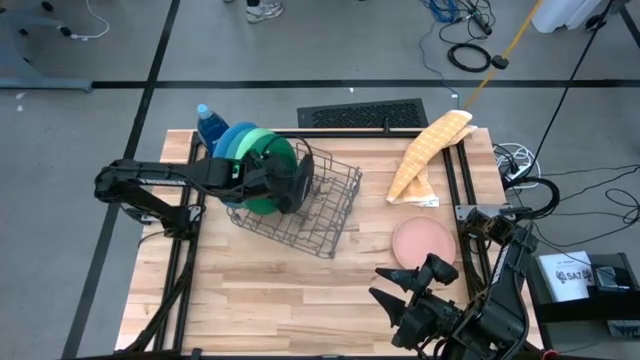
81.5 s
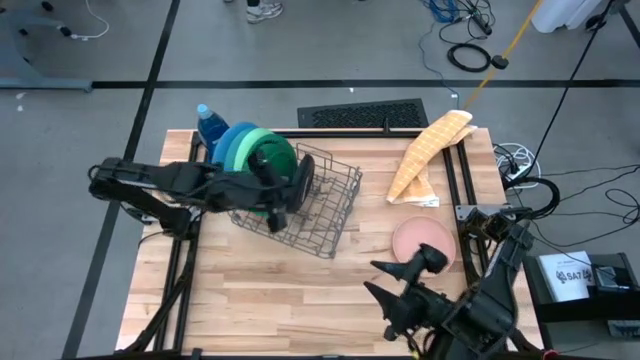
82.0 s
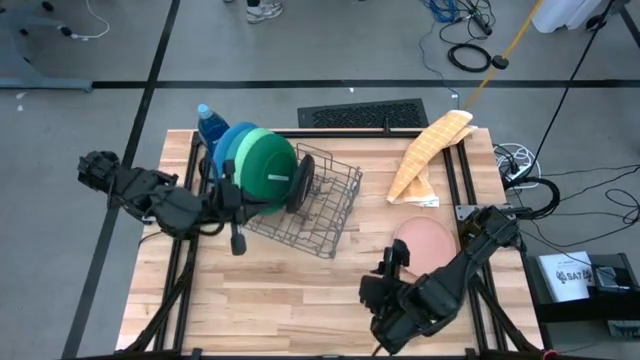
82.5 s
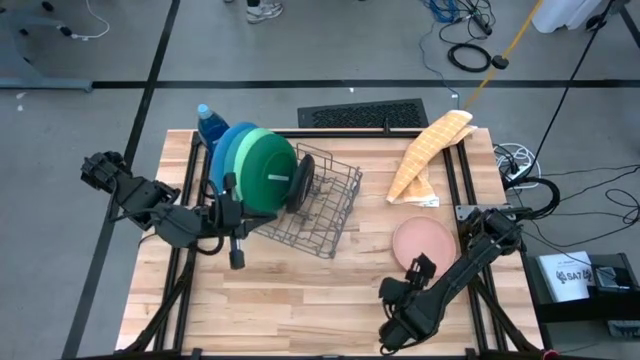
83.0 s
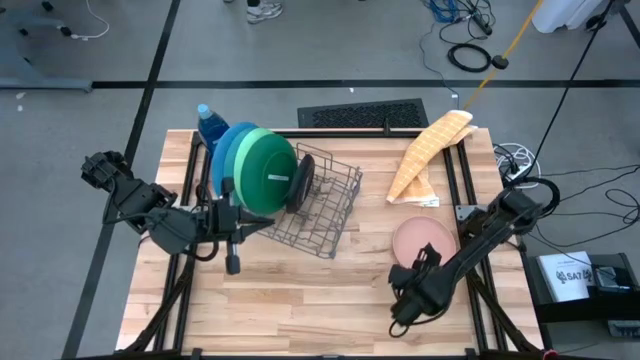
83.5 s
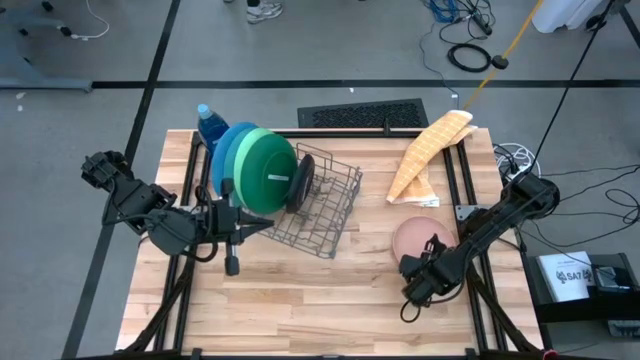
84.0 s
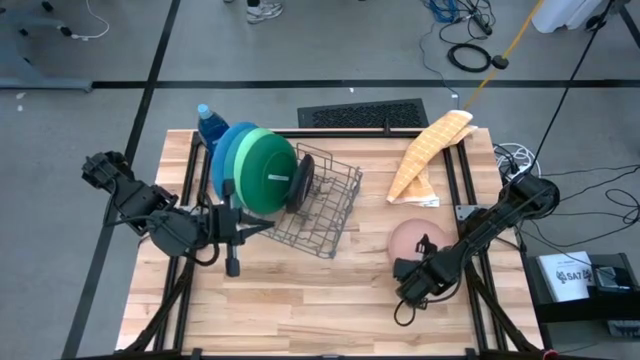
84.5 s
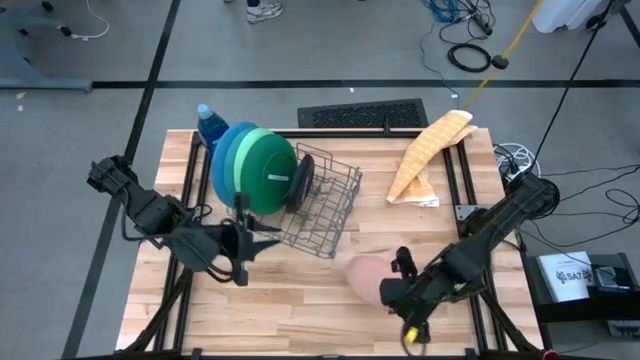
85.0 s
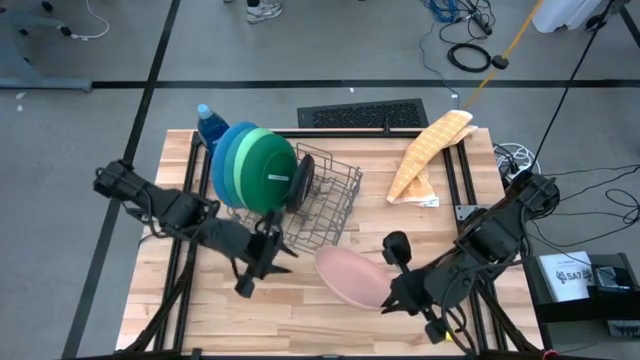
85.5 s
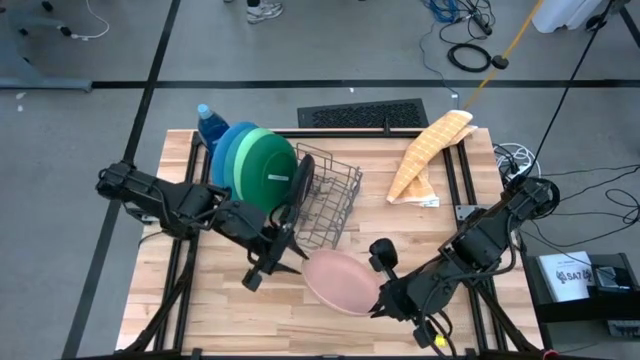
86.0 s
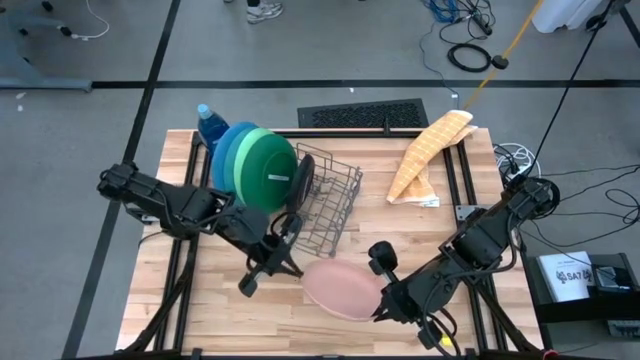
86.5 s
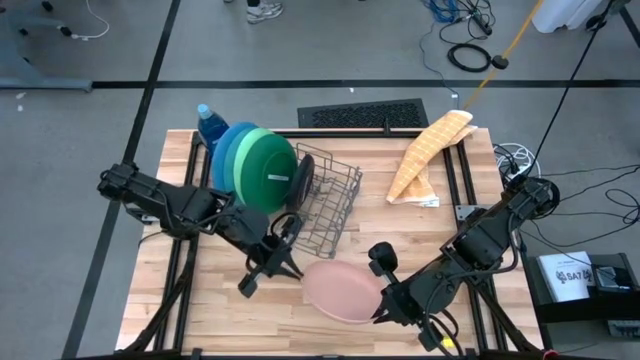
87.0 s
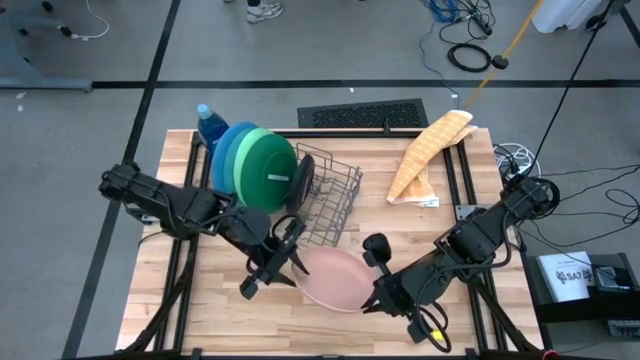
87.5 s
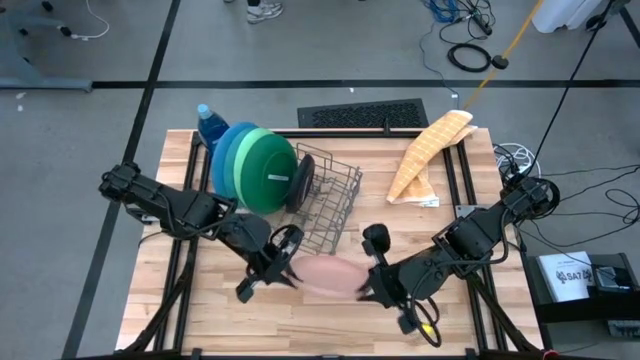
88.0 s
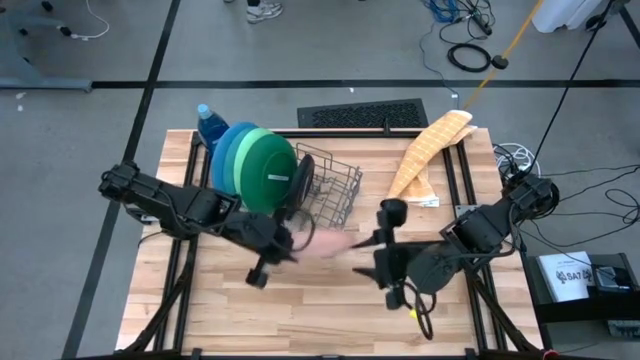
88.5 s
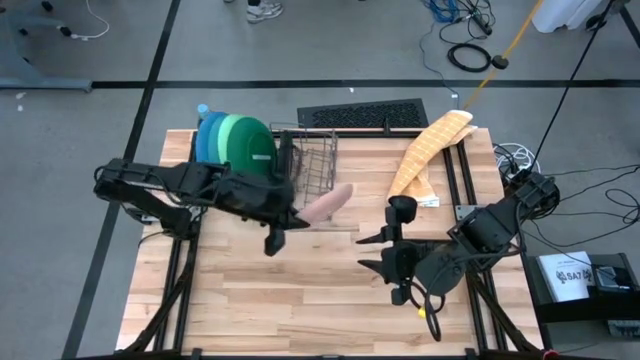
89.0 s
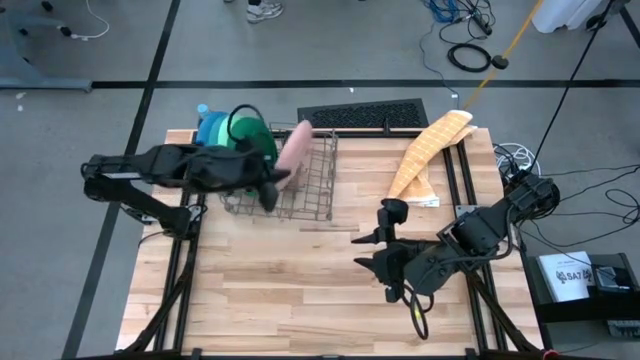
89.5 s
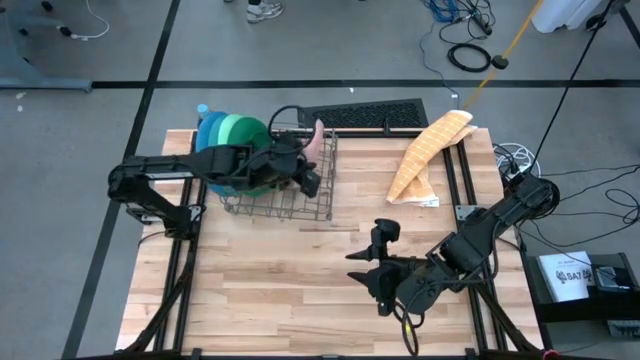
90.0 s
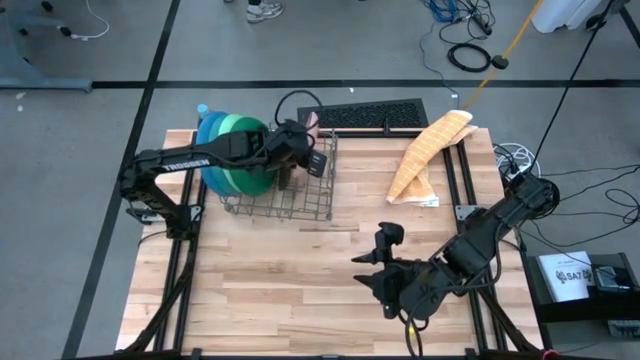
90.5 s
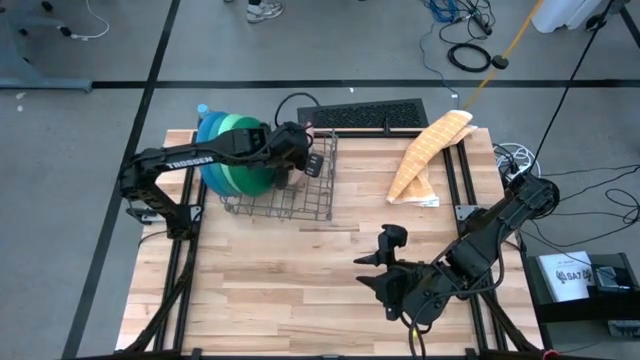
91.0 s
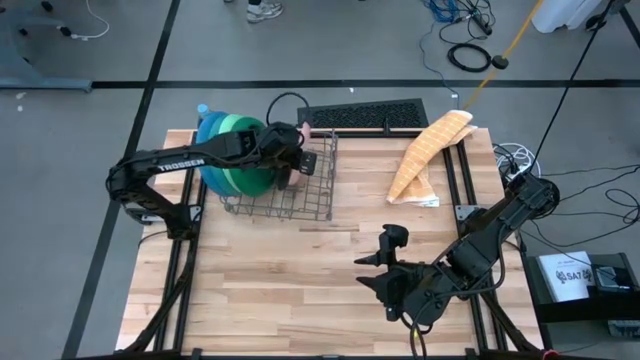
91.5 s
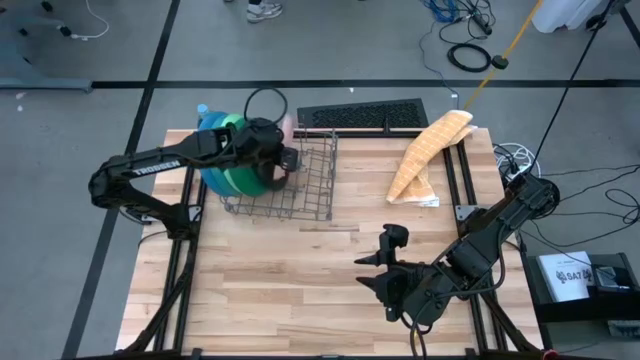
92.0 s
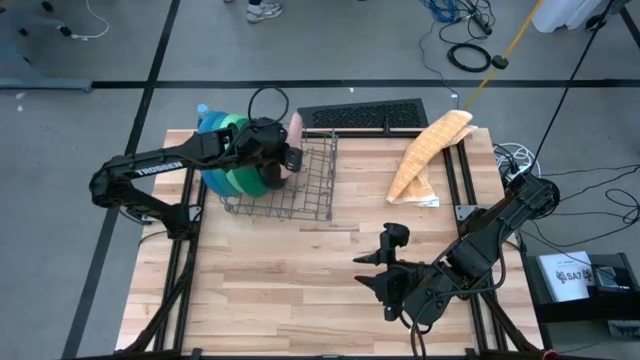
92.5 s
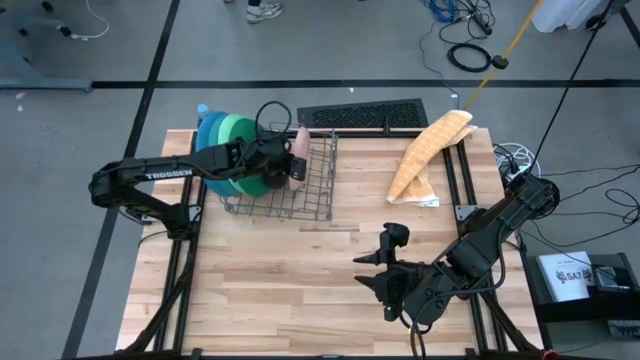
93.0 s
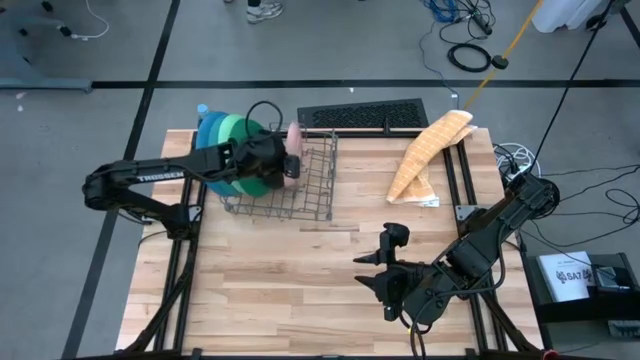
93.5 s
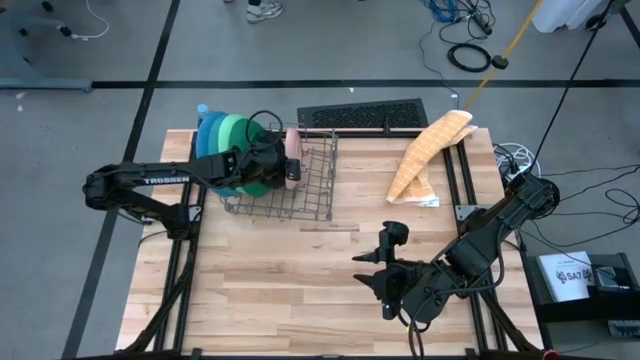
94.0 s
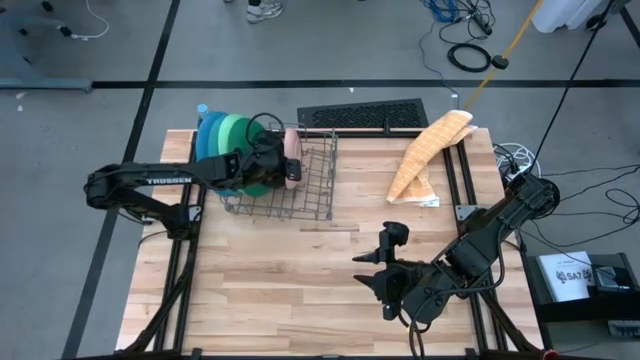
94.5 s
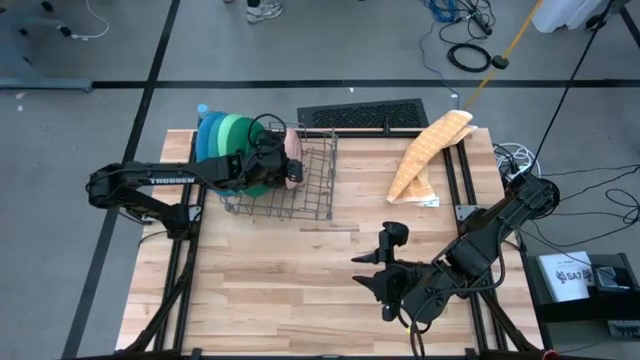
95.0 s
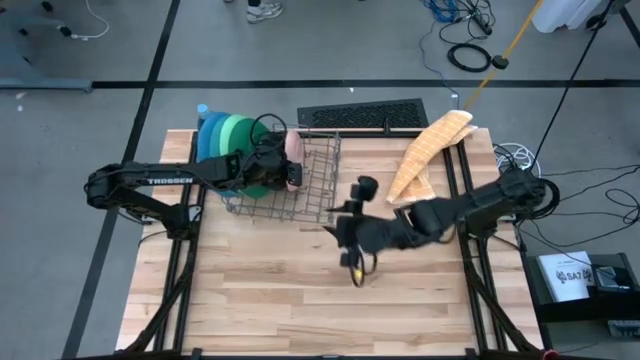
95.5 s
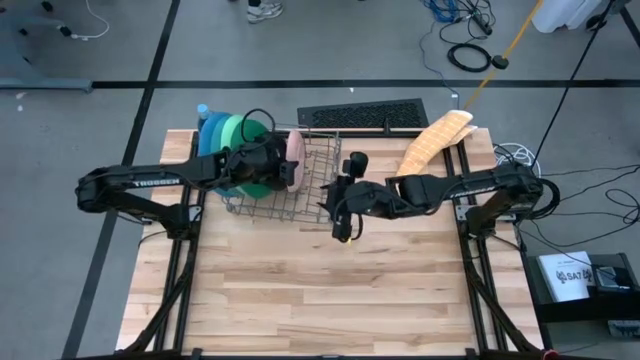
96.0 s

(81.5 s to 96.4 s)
Task: Sort dishes
Put the pink plate into the dishwasher rack

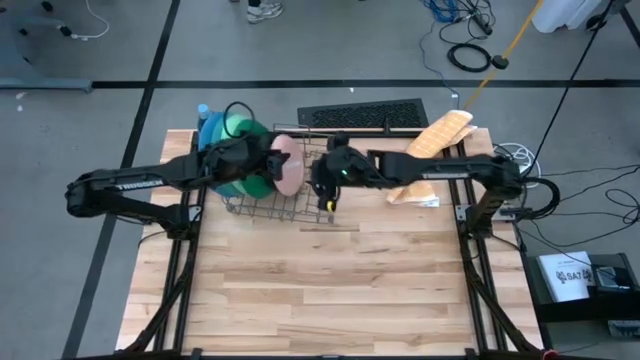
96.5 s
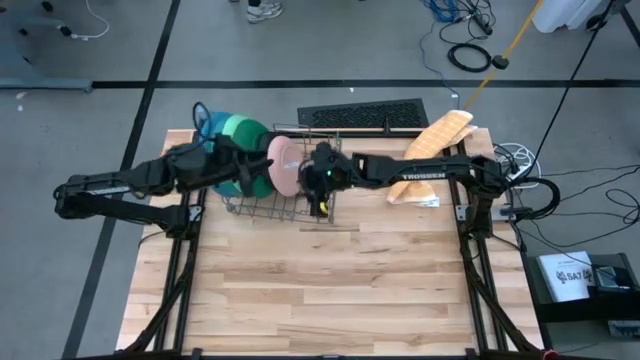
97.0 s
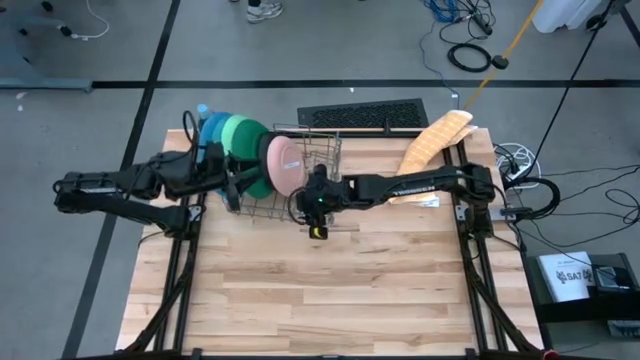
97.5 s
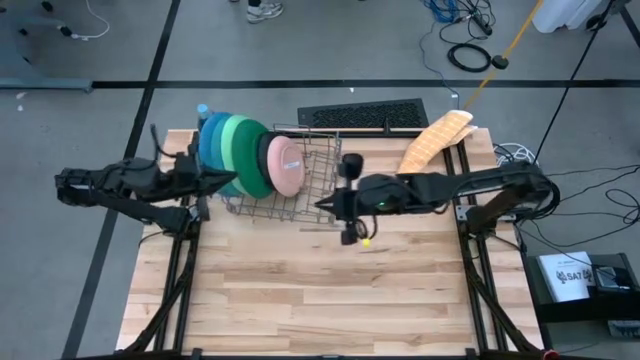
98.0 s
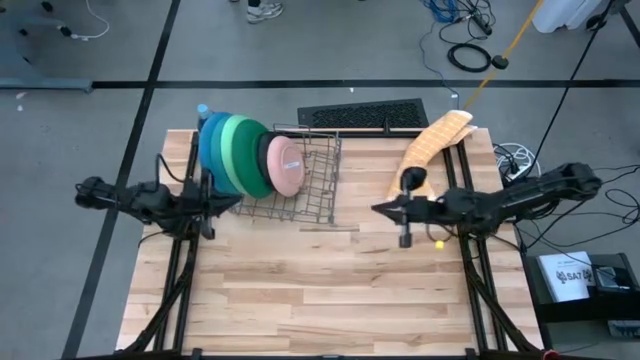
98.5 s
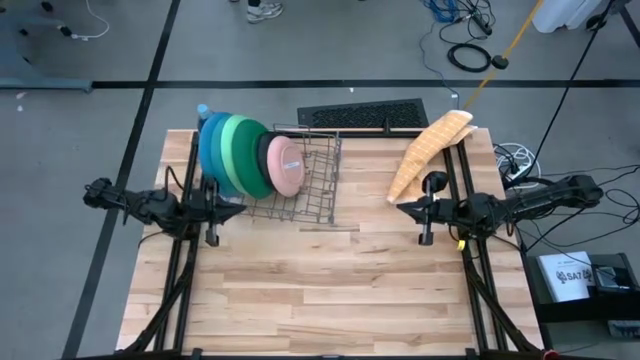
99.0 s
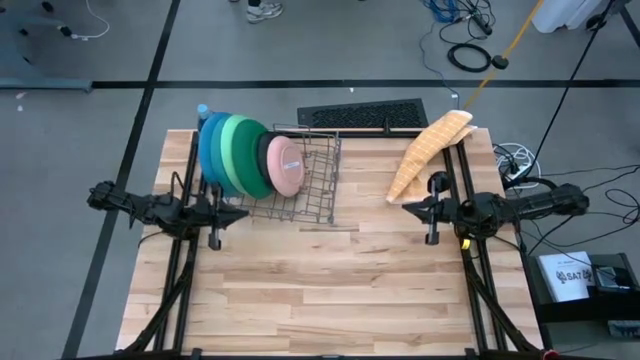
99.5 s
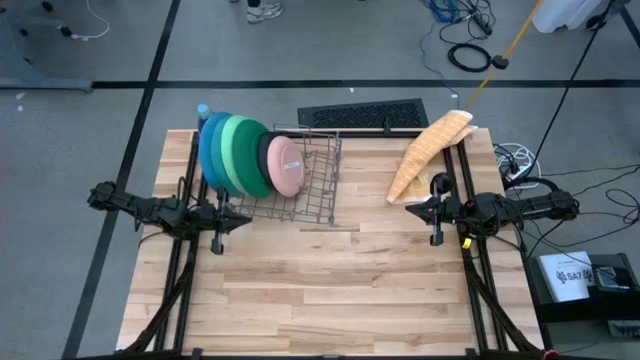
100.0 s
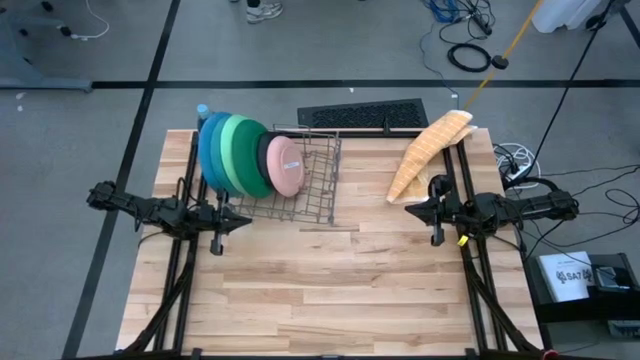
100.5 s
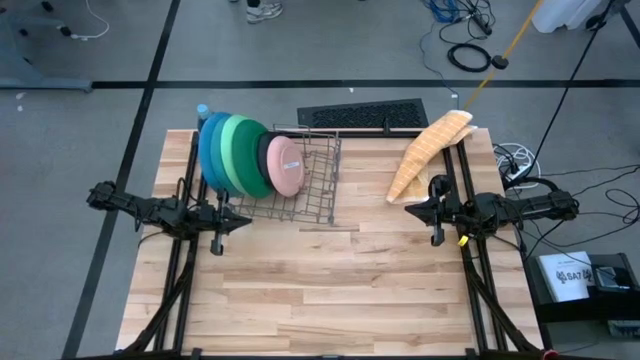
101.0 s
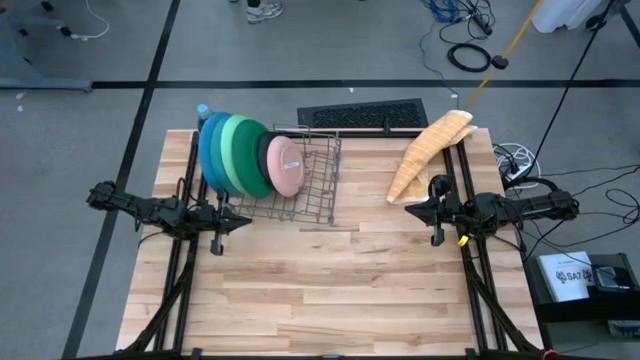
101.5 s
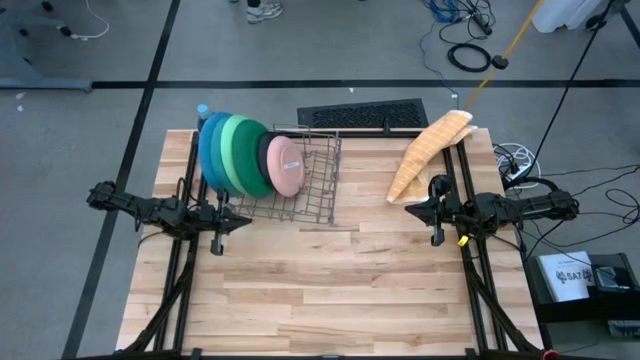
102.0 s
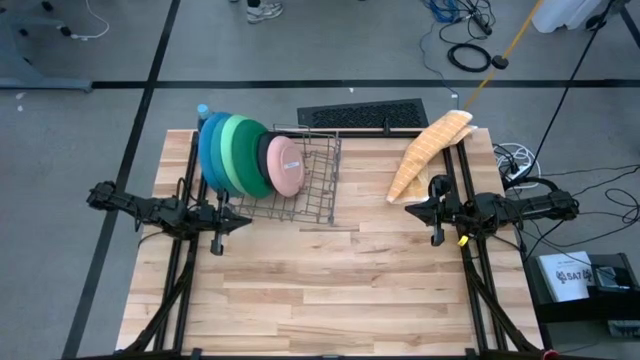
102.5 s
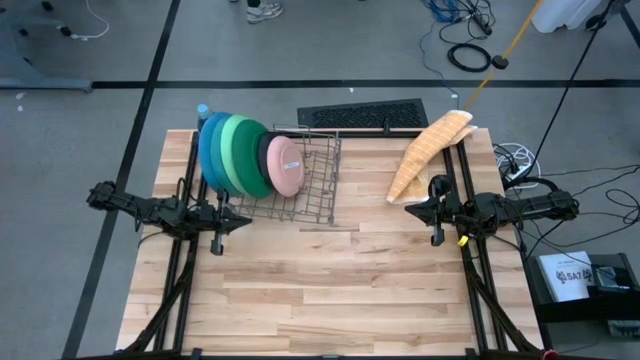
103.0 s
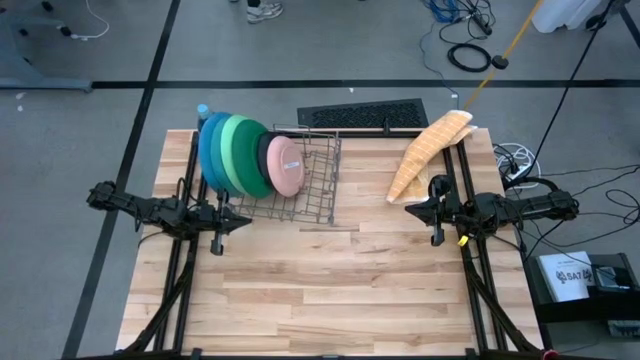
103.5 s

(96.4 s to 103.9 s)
Return to Home Position
